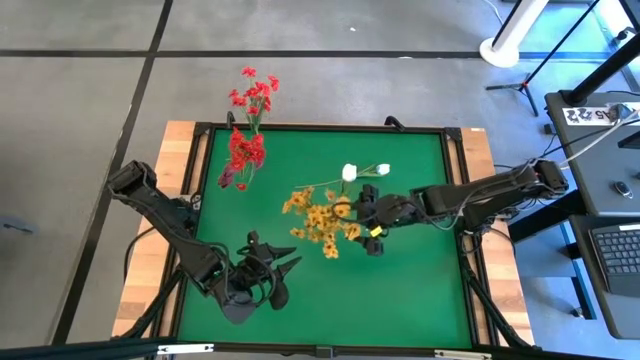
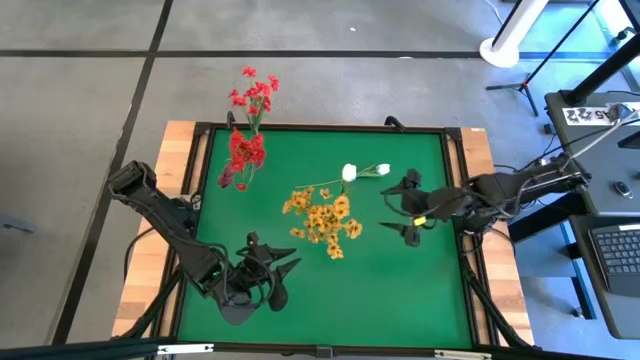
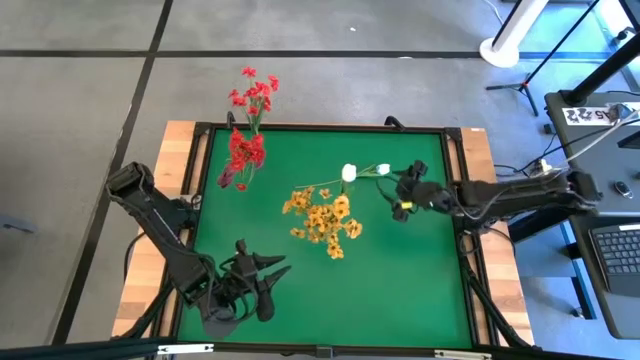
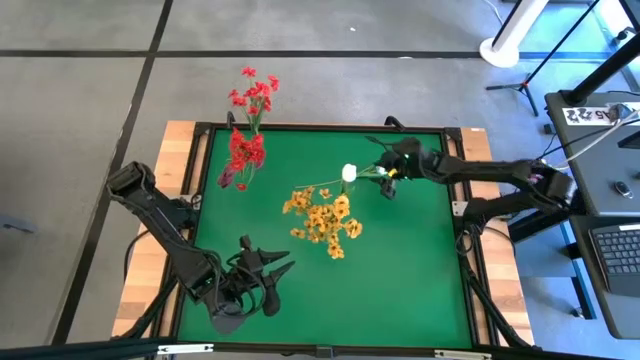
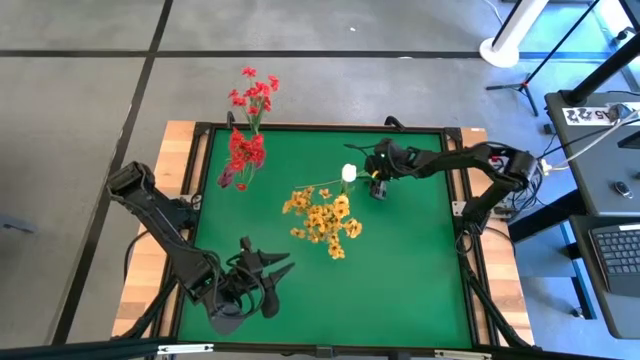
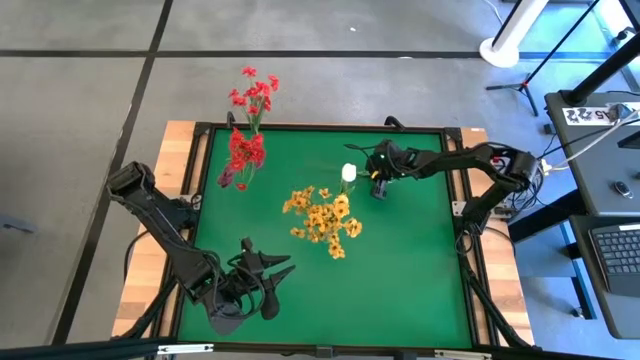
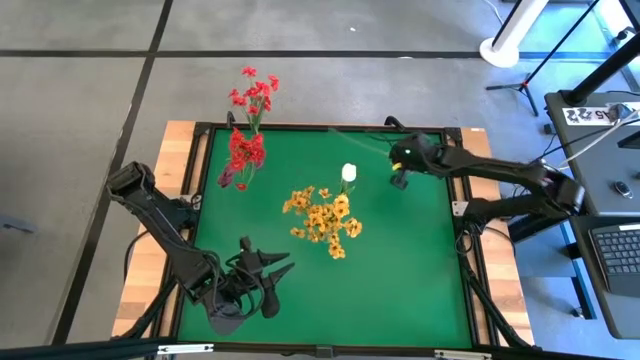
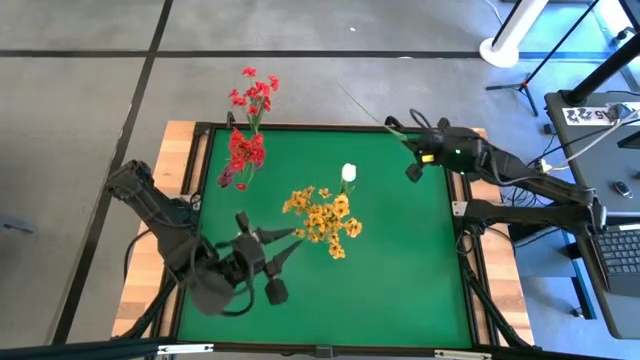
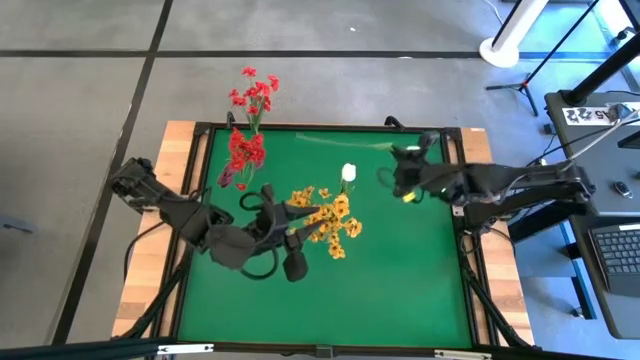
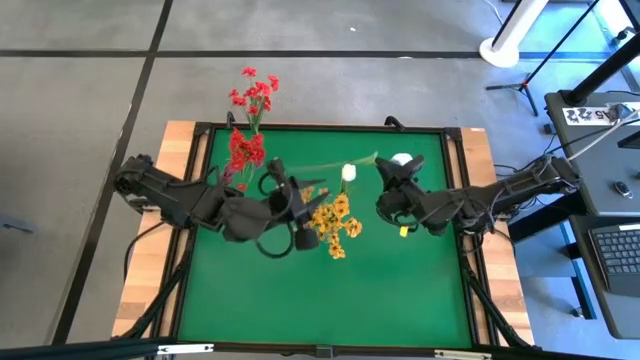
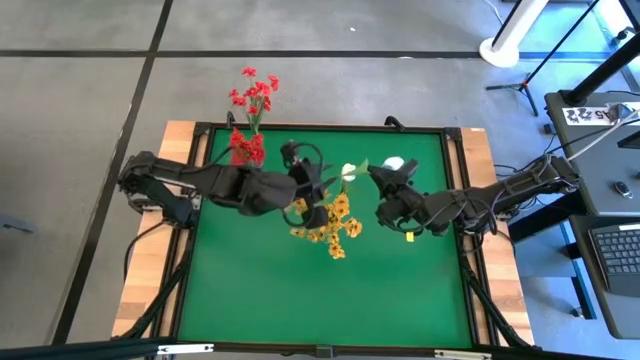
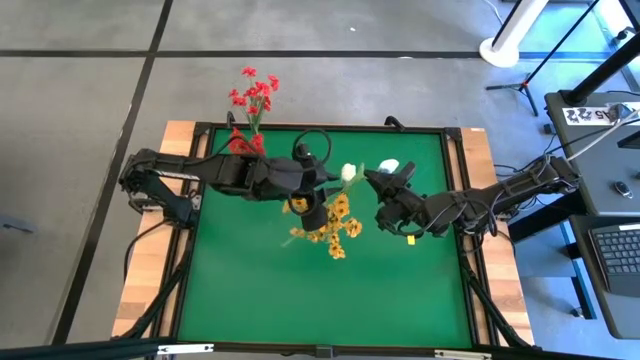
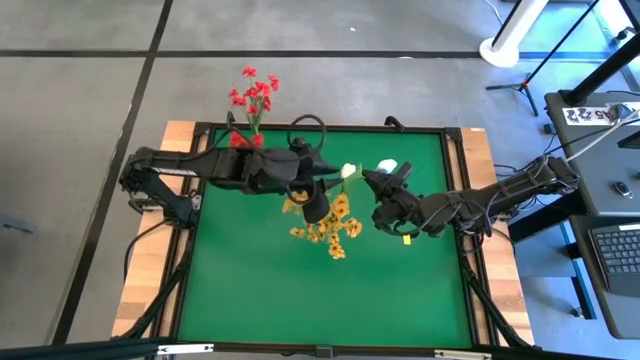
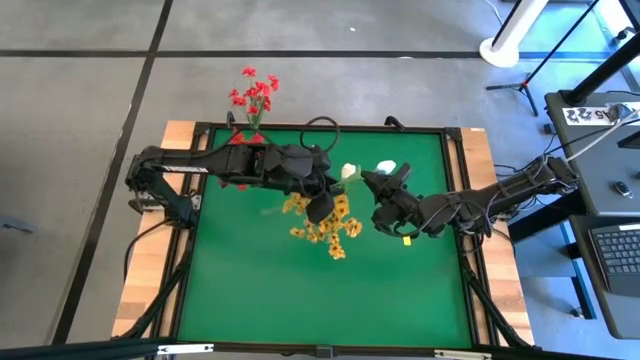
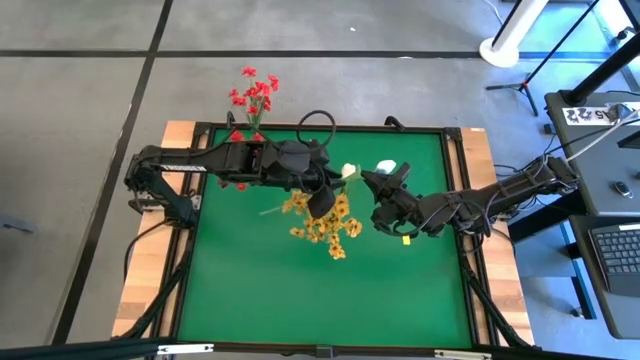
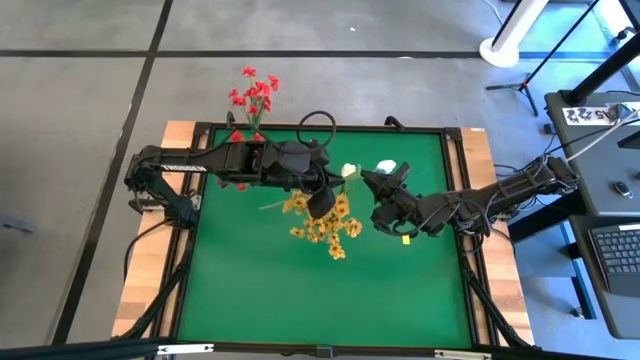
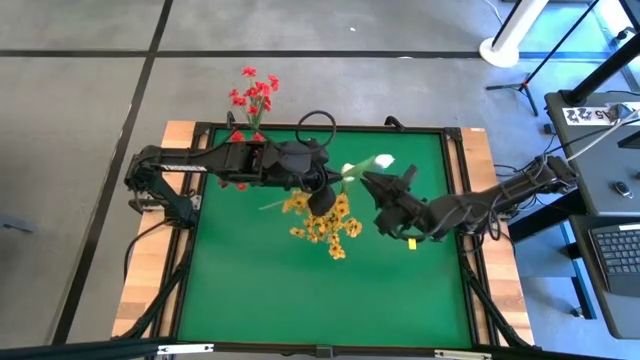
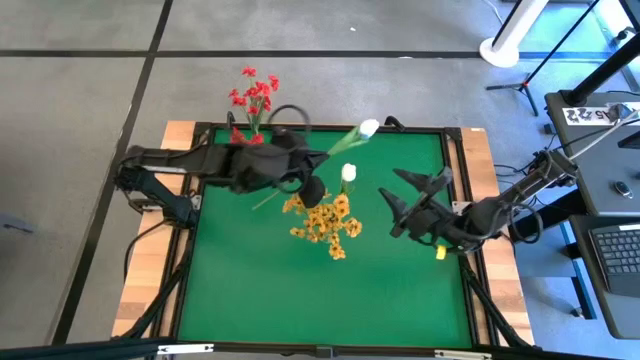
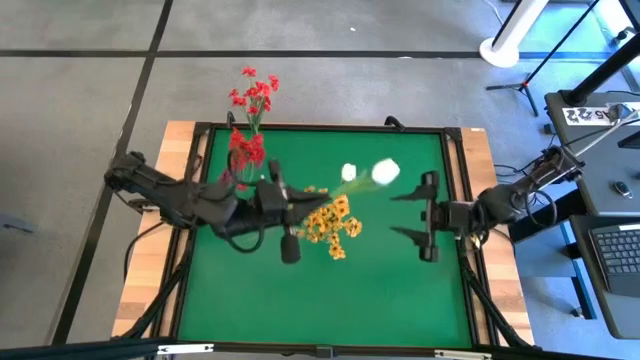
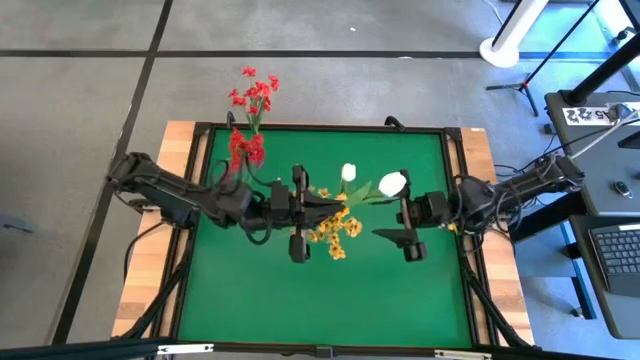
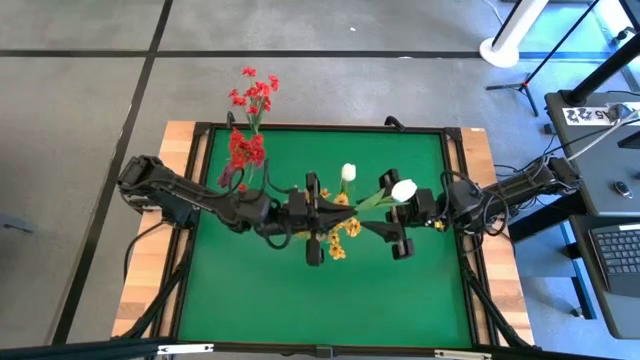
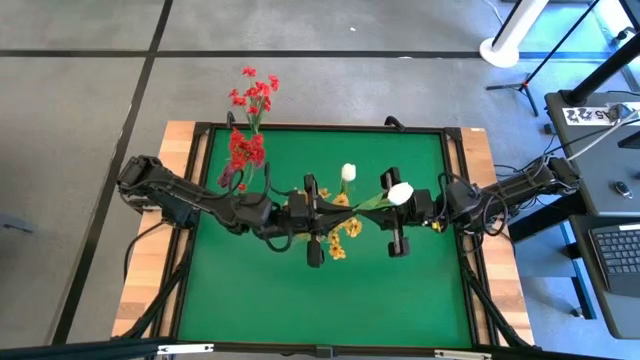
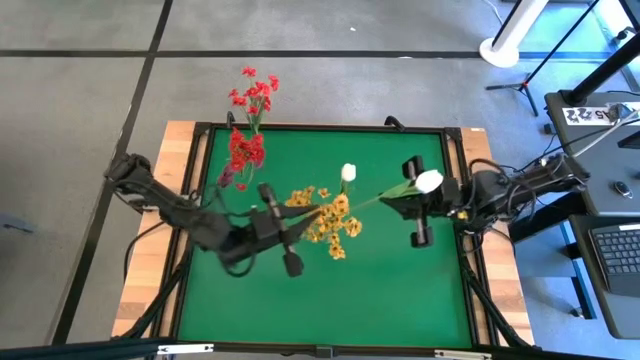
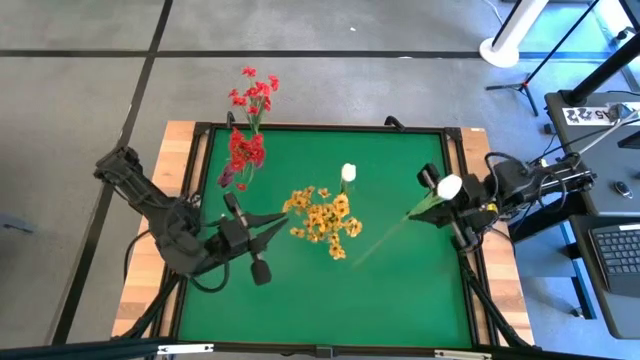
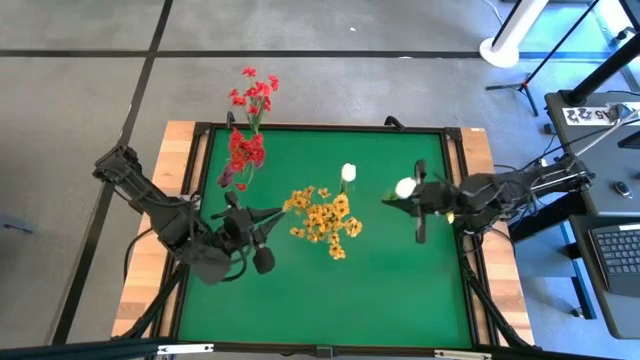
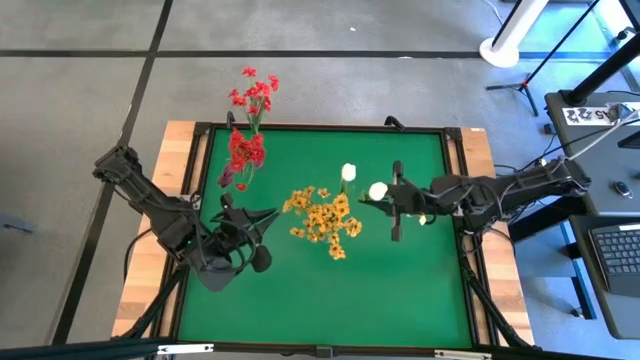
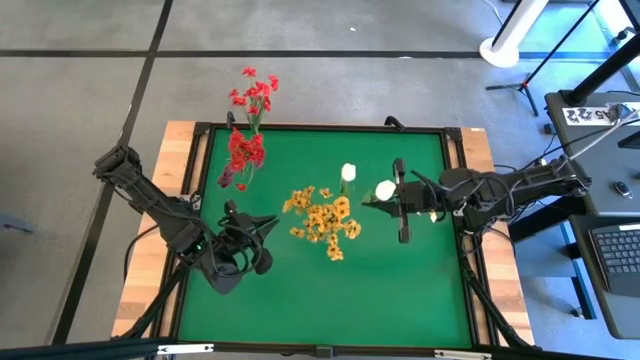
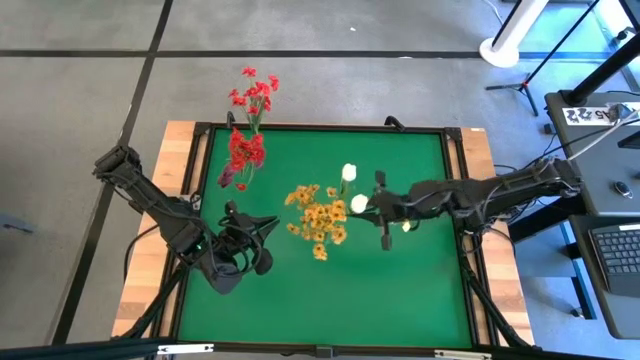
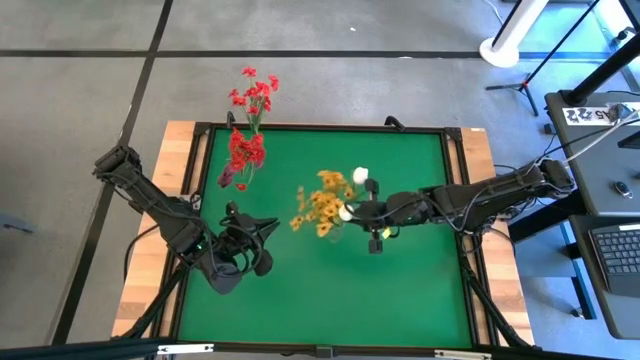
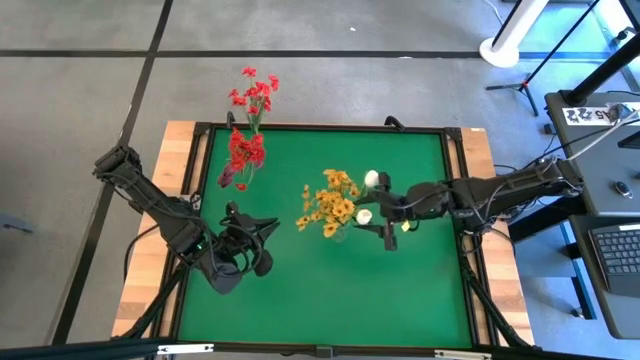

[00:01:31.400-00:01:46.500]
Task: Sort flowers into vase by color
Put the white flower into the transparent vase

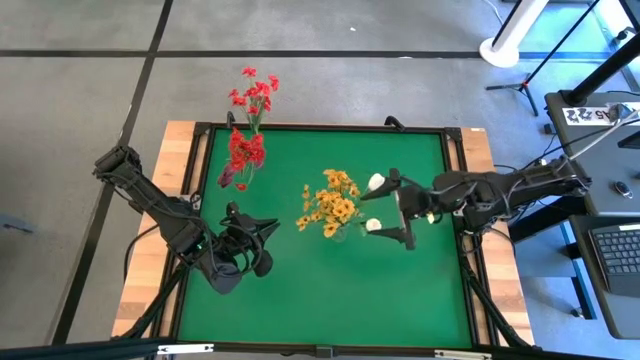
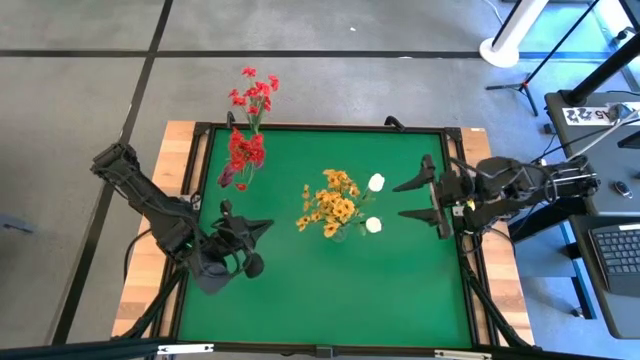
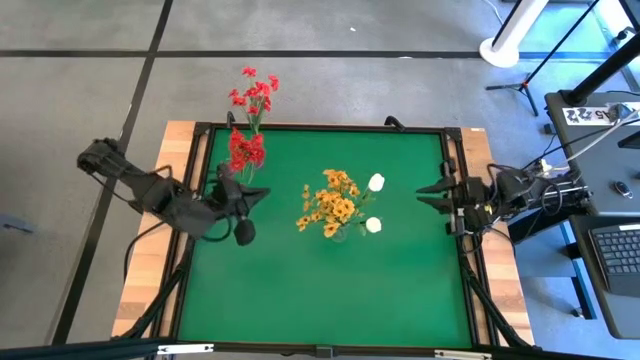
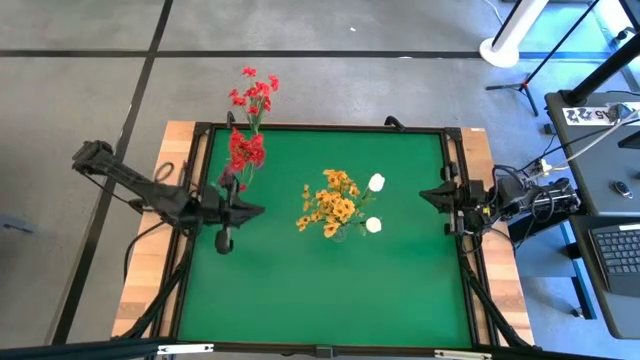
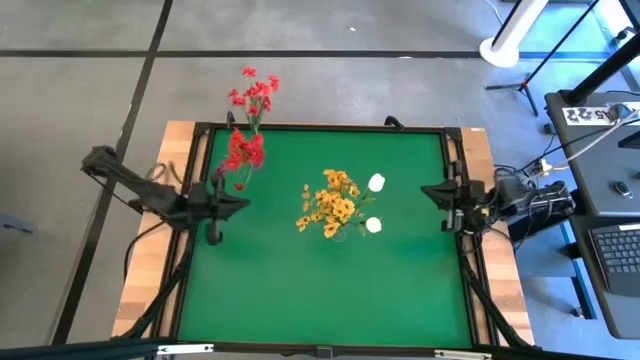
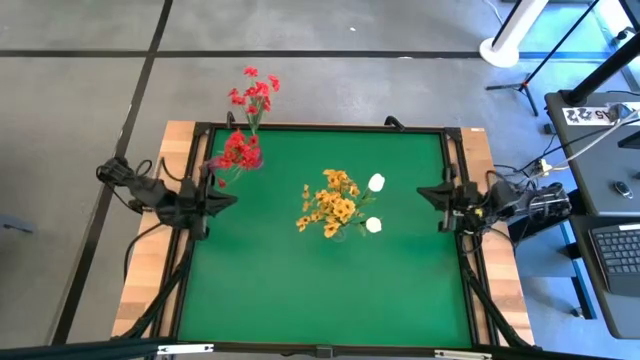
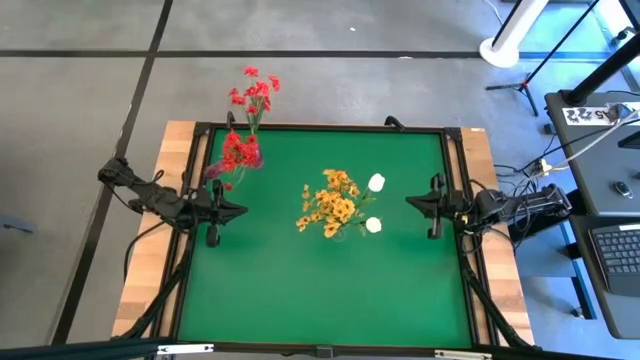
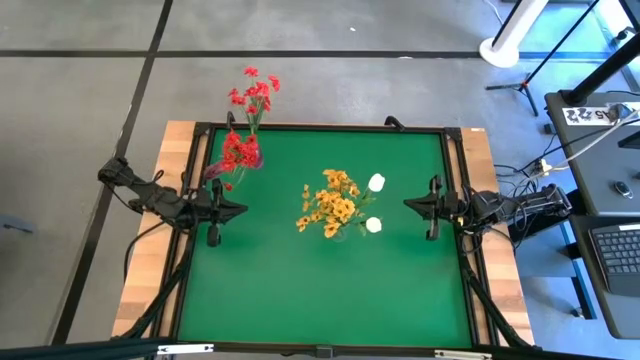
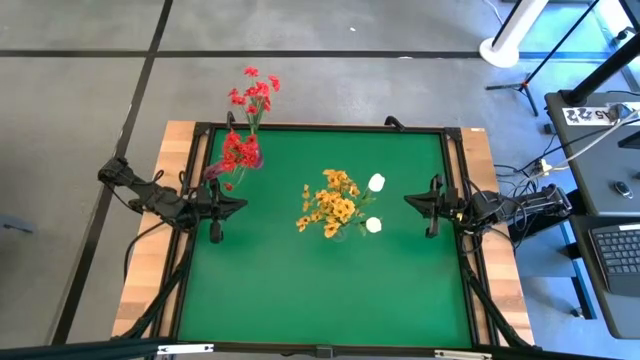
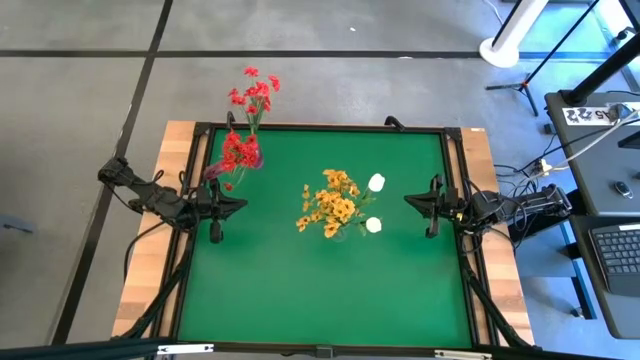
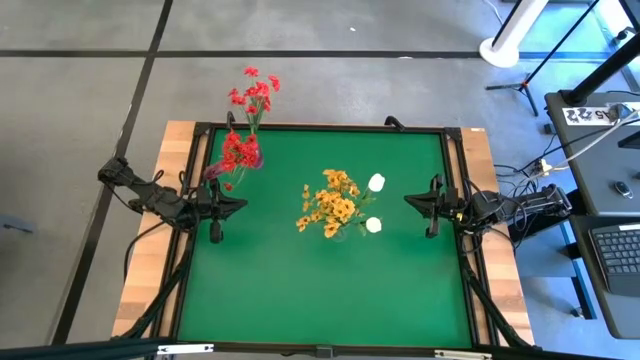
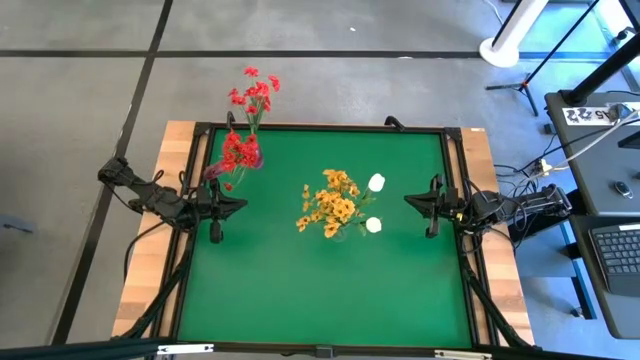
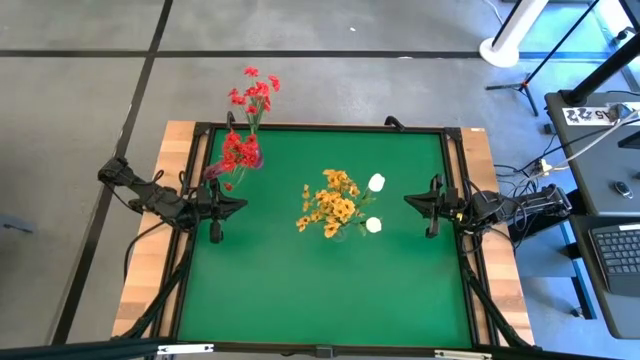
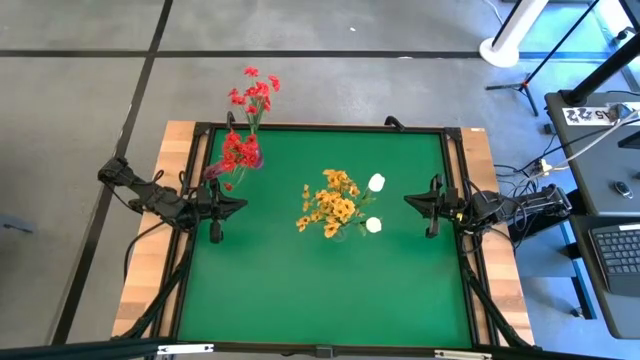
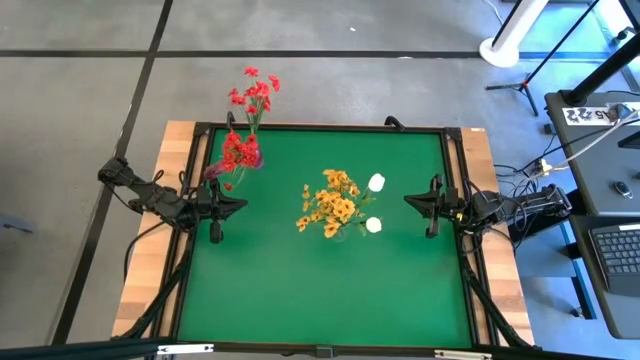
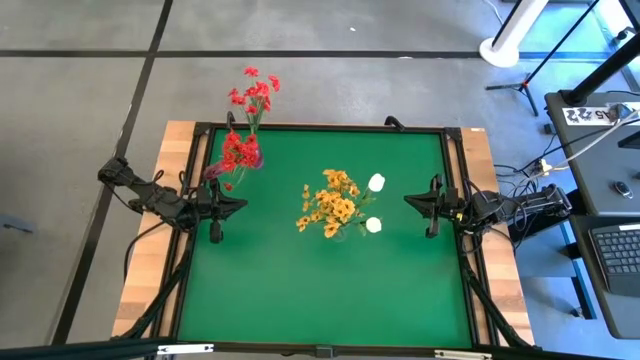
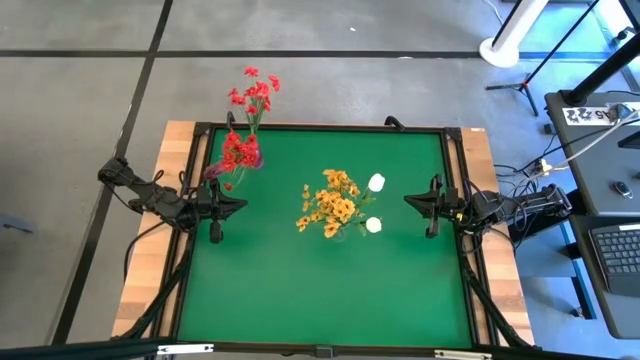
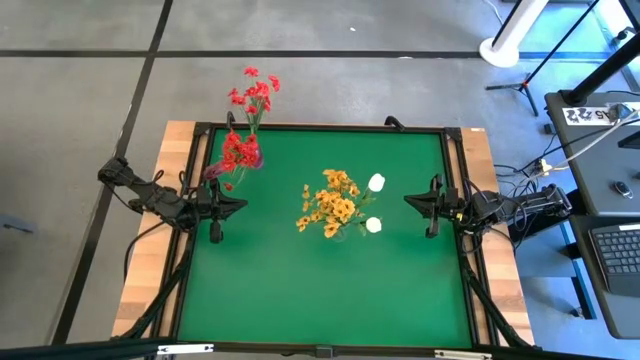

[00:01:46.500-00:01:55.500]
Return to Home Position
